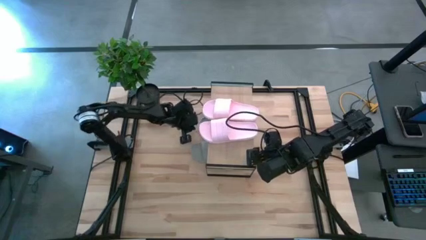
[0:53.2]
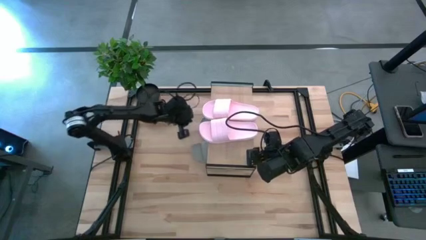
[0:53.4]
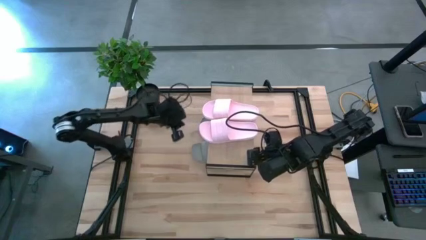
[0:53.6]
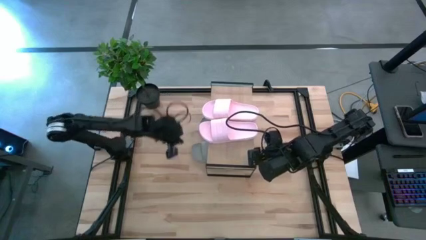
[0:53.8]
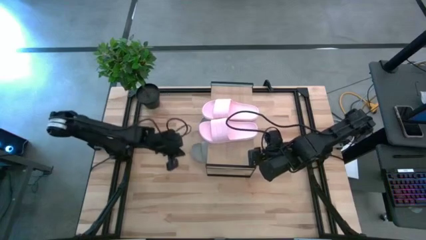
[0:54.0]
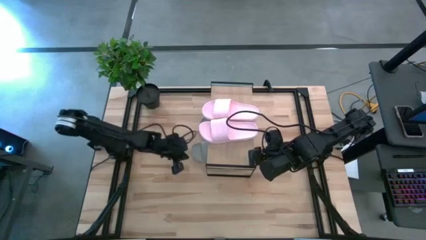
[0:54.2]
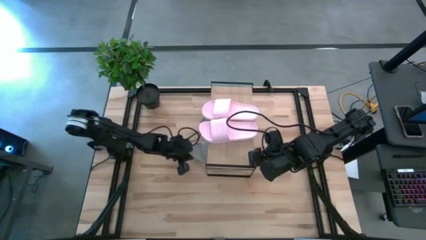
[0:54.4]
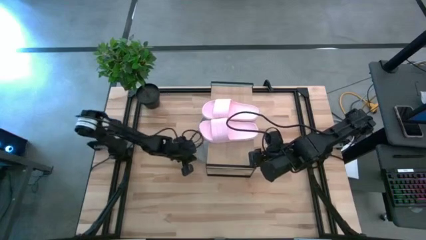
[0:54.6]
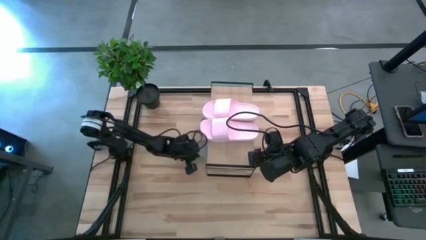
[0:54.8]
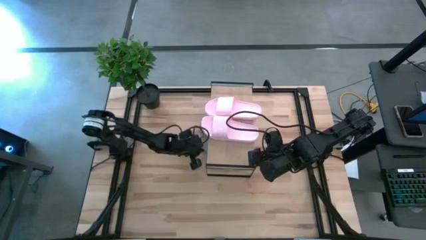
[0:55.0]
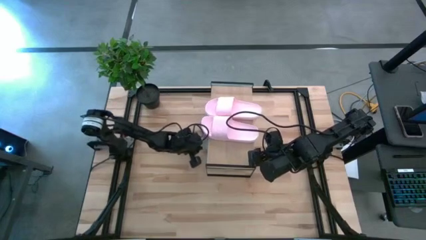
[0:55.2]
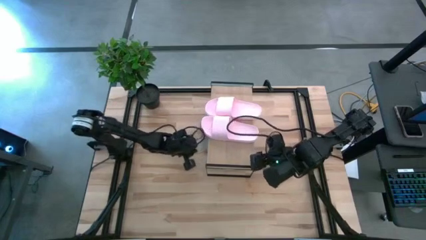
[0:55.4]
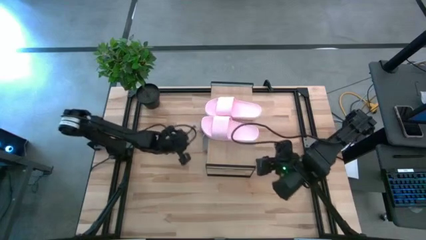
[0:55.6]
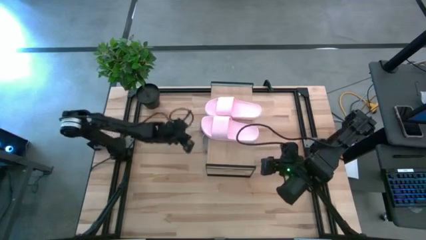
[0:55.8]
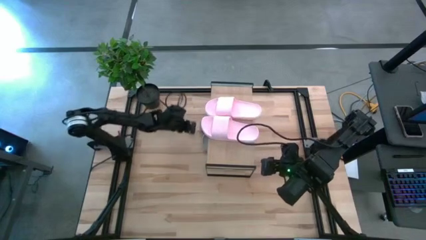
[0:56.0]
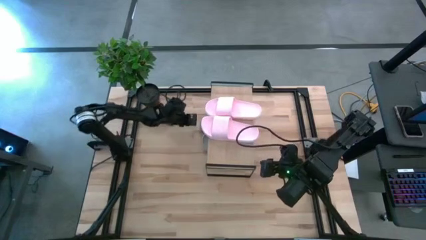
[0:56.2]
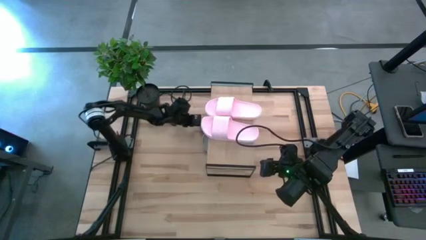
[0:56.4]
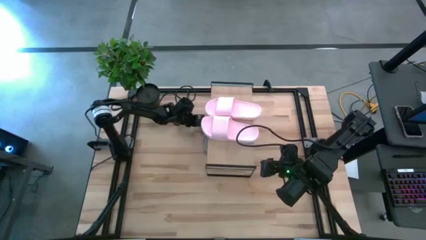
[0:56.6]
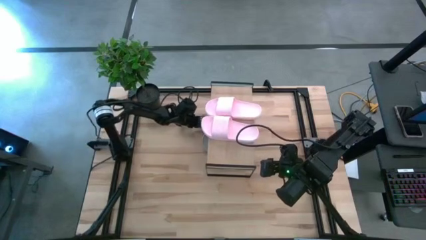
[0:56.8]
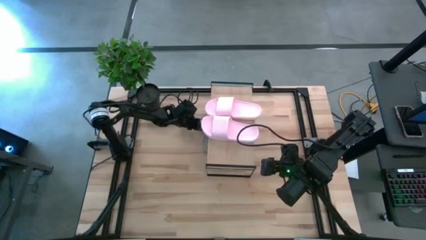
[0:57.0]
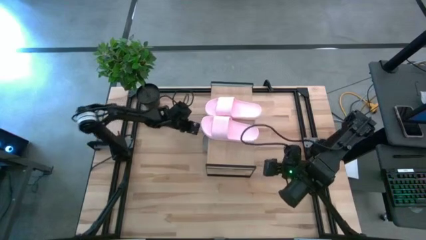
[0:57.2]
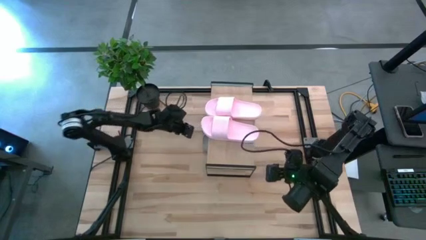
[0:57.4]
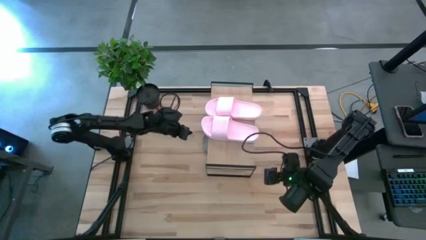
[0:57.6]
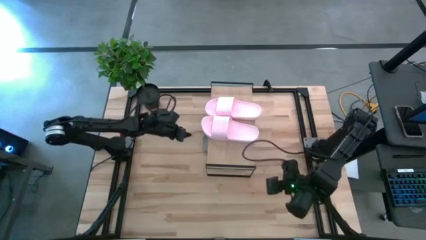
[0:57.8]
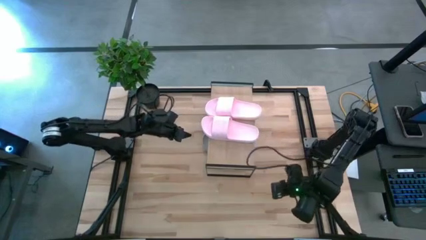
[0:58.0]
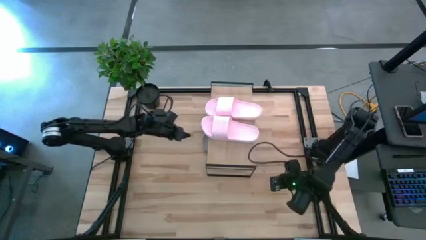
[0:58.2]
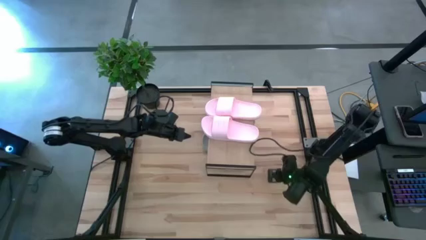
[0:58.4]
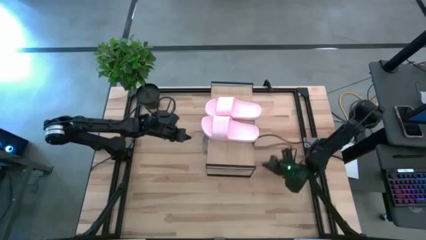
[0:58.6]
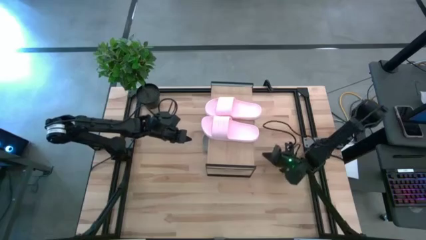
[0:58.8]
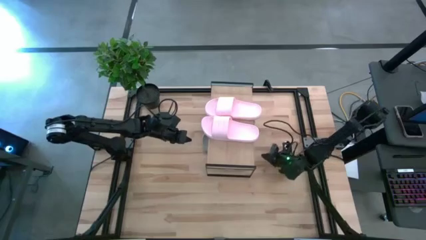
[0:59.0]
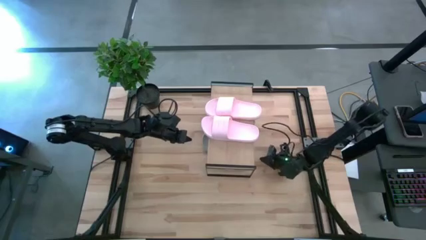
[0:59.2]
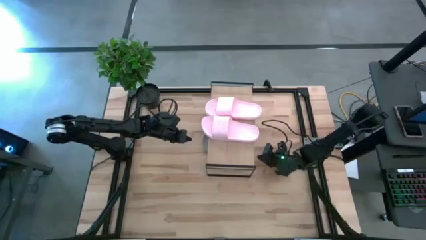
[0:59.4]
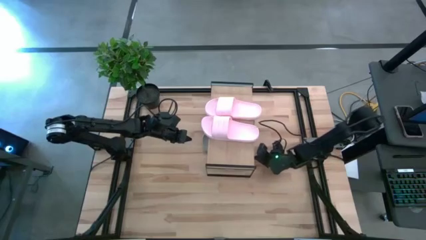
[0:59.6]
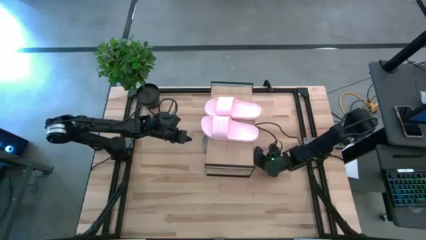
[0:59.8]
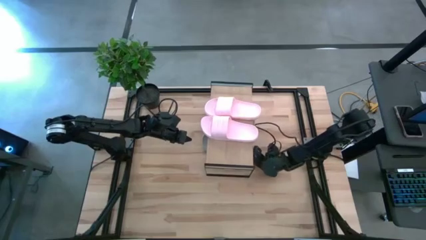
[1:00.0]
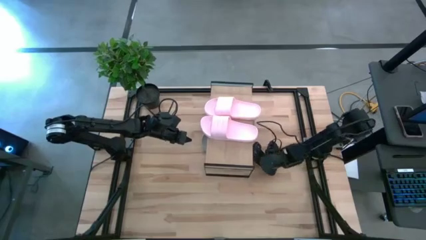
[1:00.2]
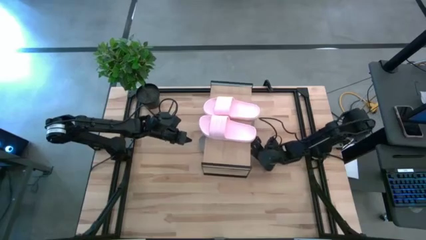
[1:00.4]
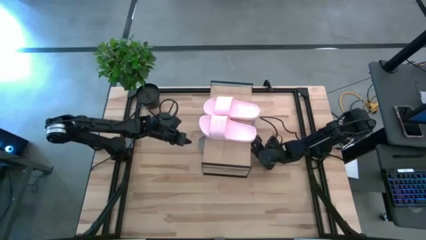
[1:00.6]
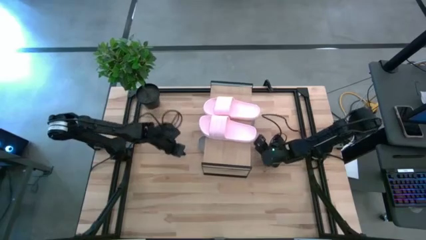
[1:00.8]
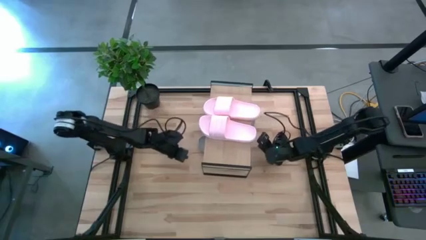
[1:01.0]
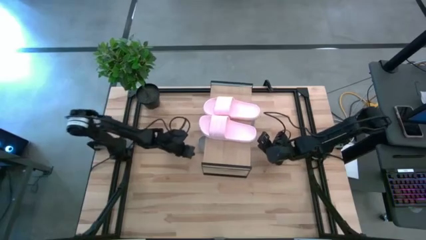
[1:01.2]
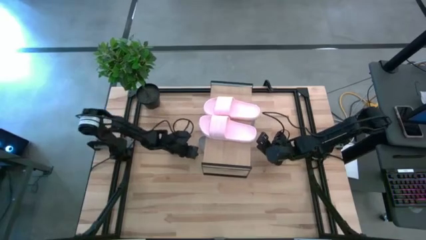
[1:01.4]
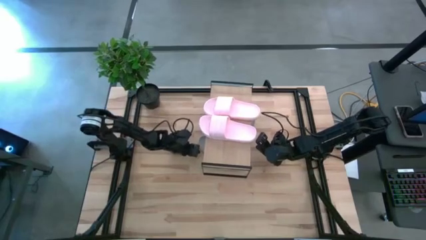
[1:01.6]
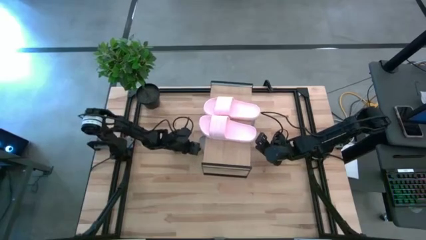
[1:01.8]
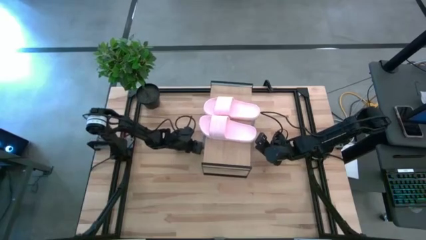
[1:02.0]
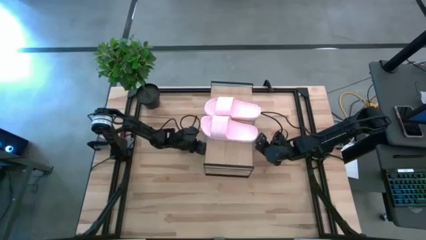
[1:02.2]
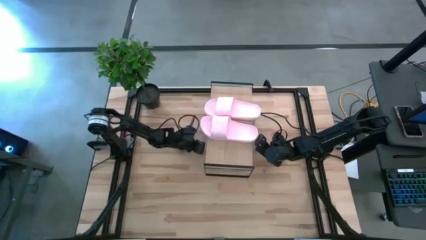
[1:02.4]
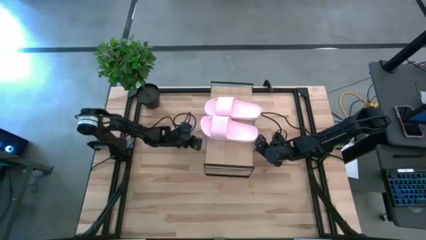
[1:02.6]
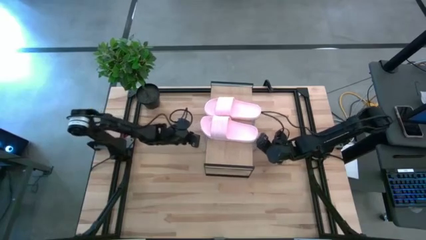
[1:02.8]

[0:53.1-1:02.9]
Task: Pick and place slides into the shelf
Adjust the pink and gray slides on and under the shelf

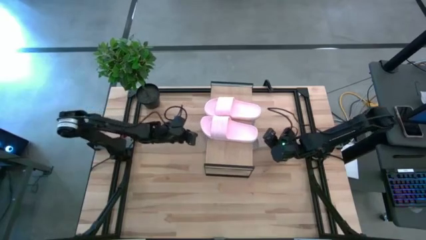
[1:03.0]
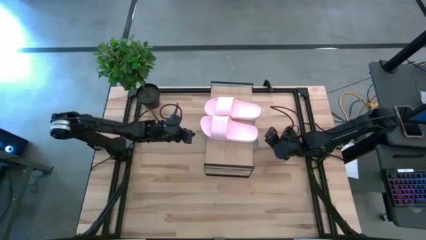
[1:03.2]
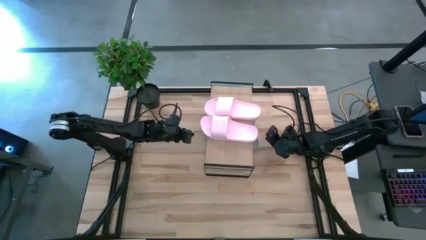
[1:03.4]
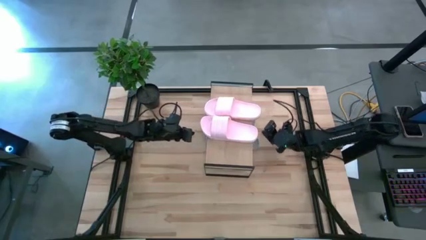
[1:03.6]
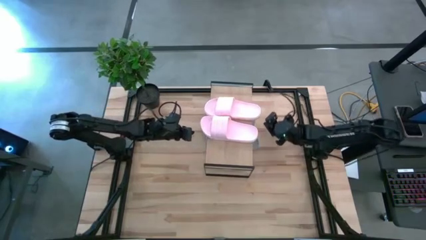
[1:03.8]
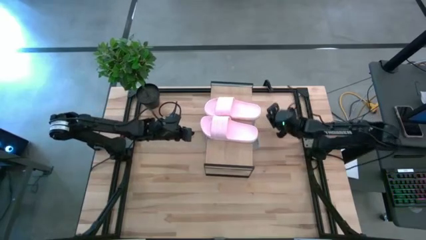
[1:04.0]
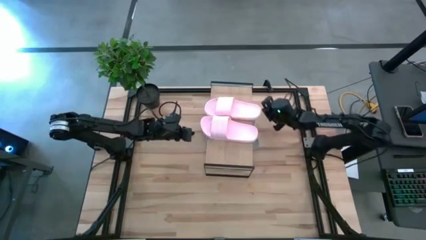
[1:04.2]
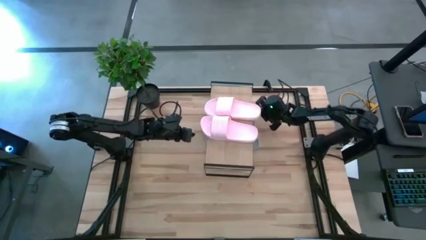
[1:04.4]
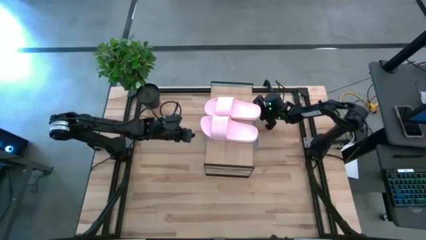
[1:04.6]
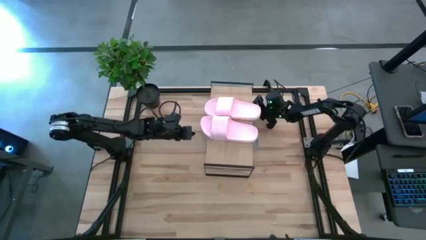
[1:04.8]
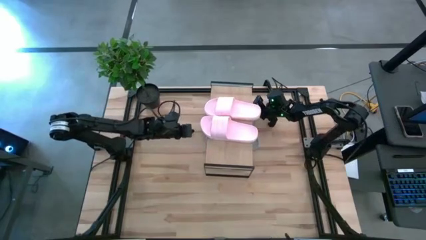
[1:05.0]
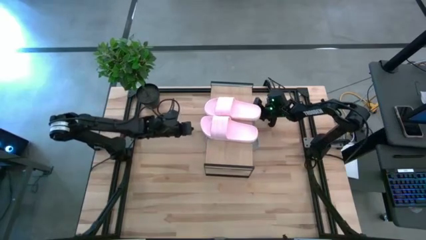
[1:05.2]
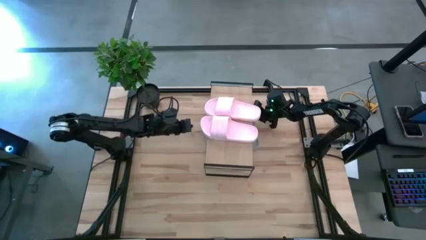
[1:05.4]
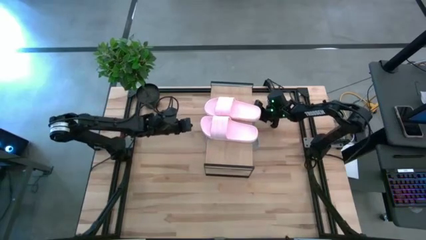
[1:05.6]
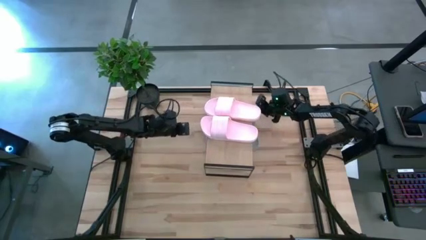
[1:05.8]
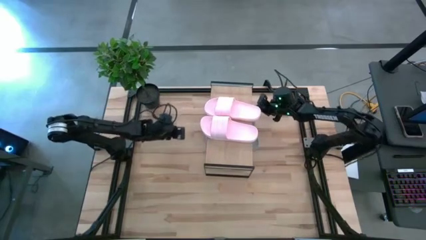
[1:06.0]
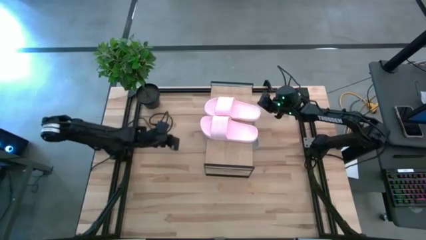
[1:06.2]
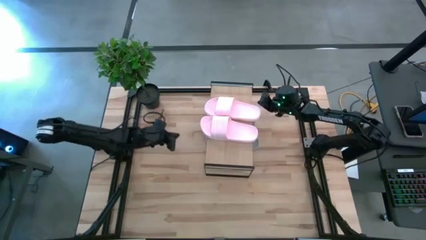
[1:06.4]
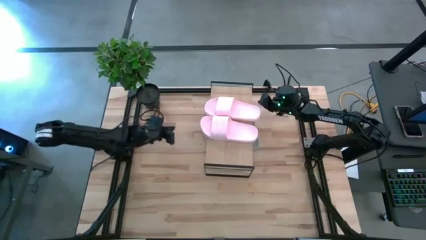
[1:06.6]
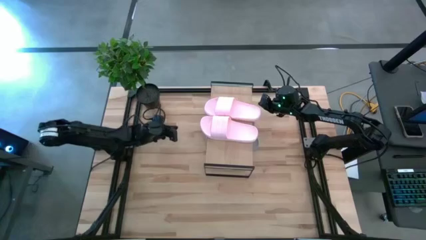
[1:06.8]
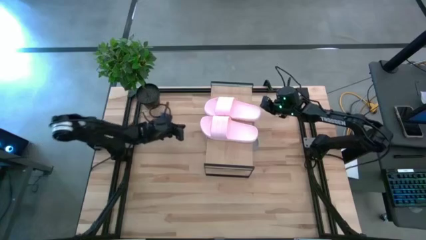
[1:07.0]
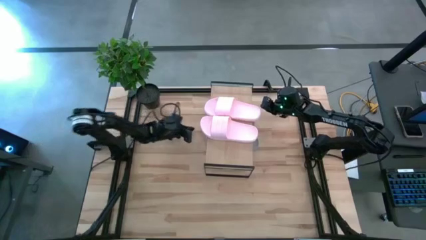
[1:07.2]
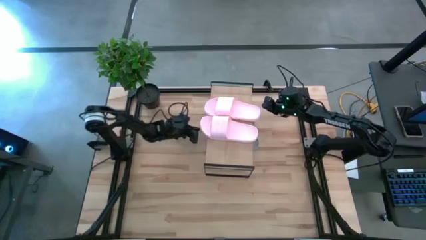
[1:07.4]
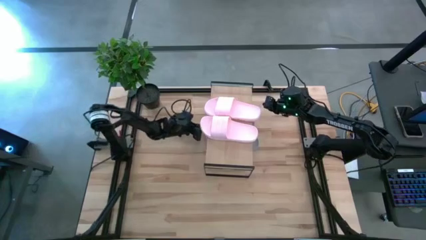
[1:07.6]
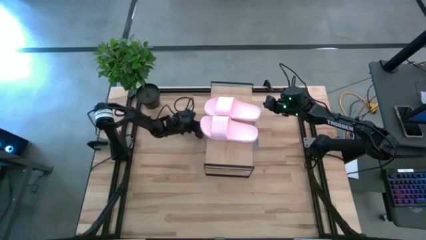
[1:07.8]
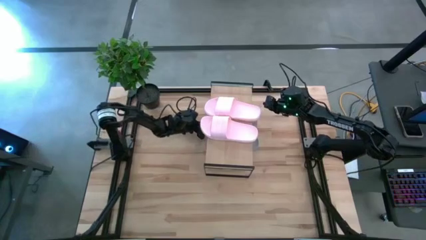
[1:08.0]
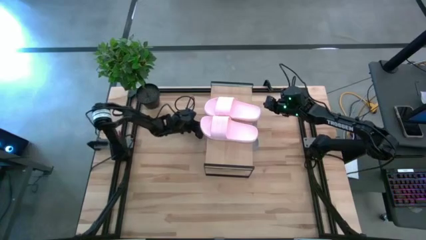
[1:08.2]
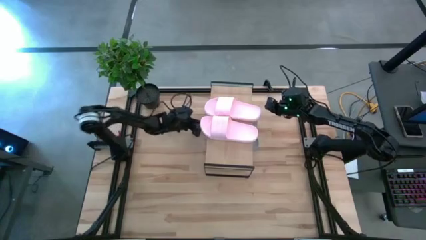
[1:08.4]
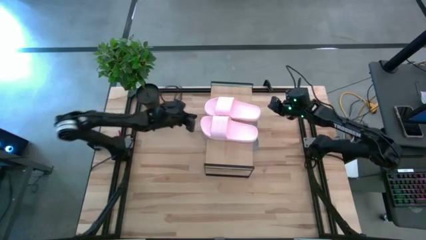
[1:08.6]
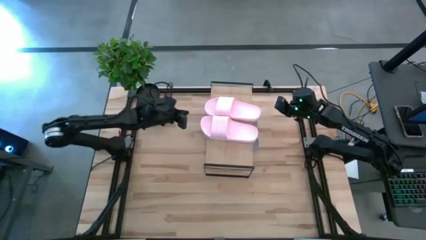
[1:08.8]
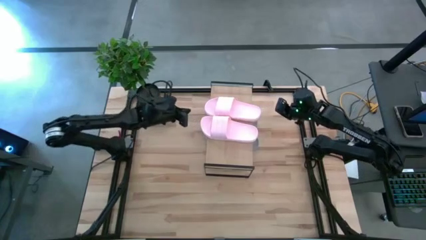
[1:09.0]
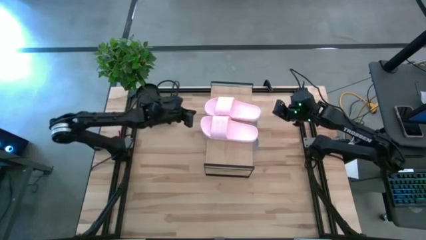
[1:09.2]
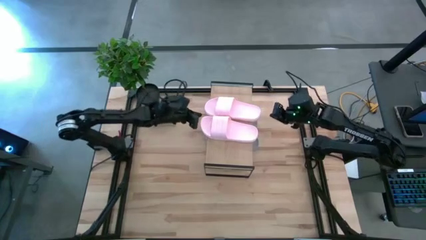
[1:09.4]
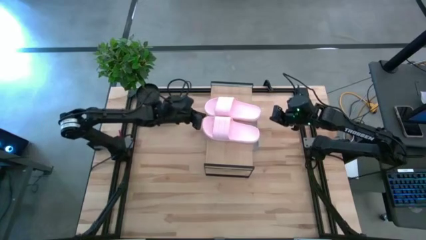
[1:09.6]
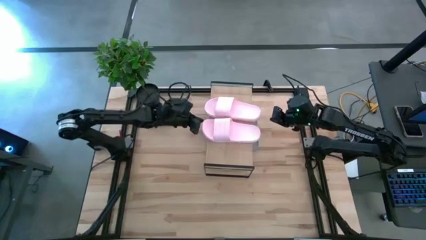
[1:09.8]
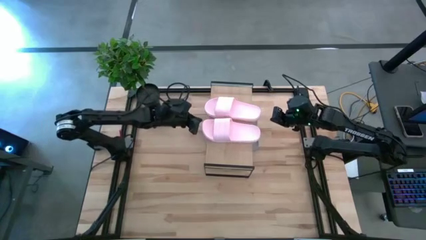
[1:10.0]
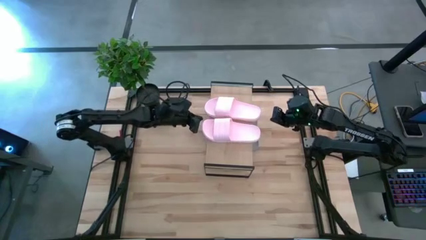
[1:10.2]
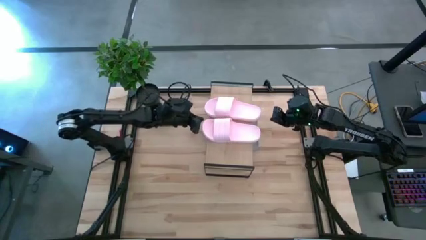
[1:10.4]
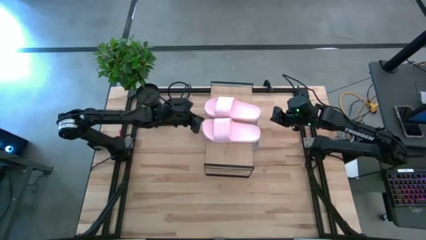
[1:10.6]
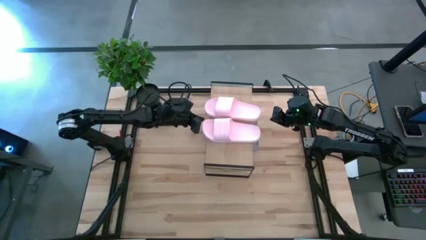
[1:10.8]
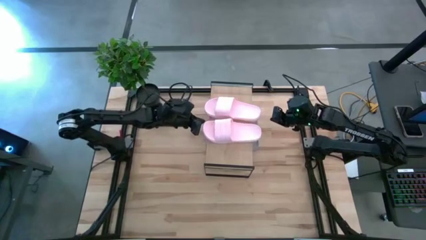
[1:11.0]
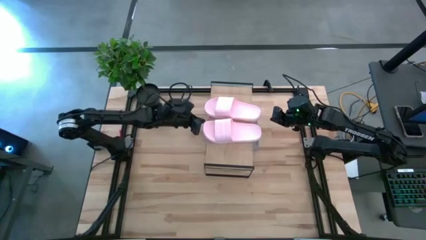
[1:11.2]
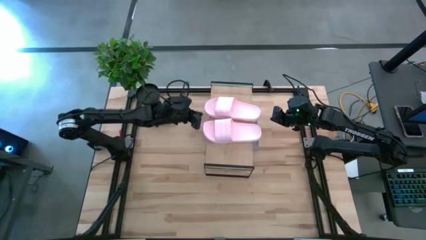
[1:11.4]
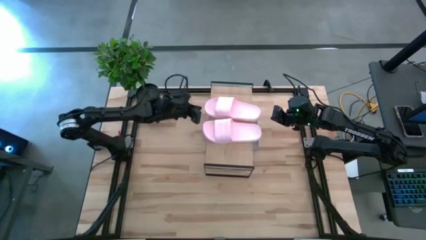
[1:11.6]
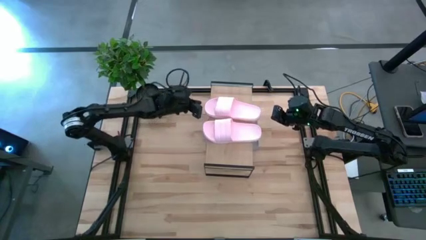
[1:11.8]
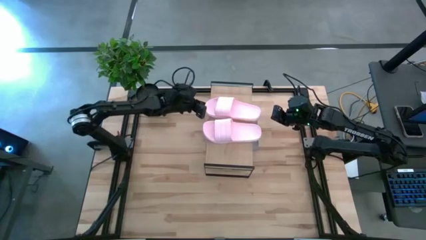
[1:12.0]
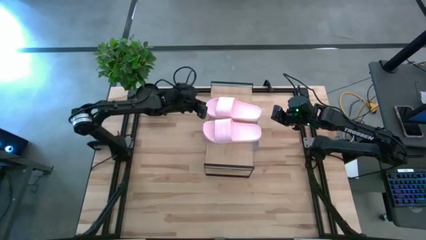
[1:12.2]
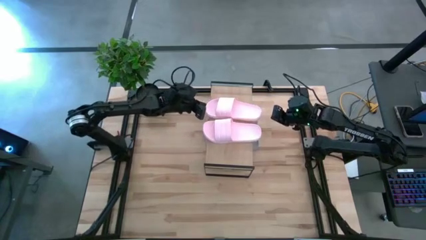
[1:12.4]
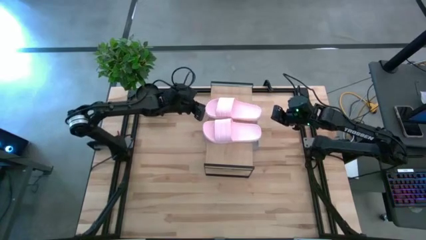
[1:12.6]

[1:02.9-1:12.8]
Adjust the pink and gray slides on and under the shelf
